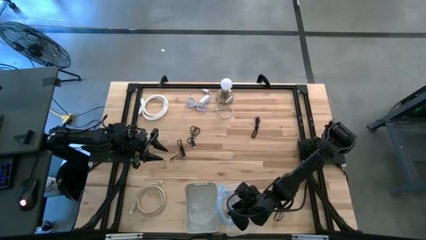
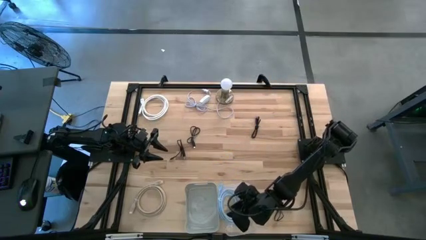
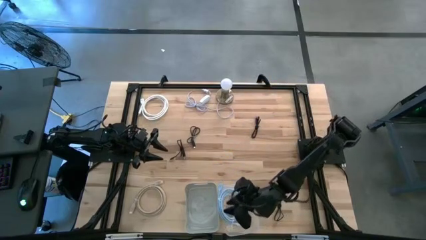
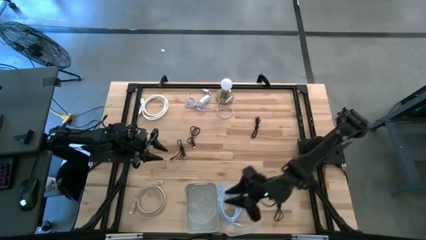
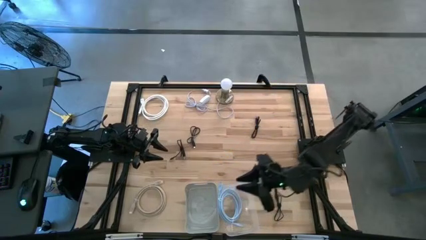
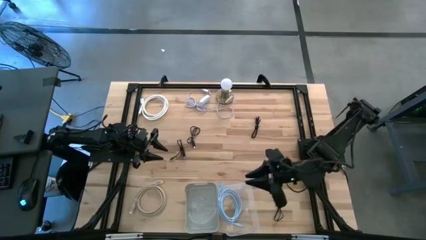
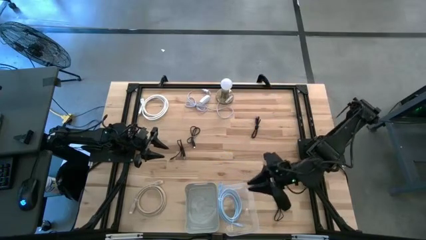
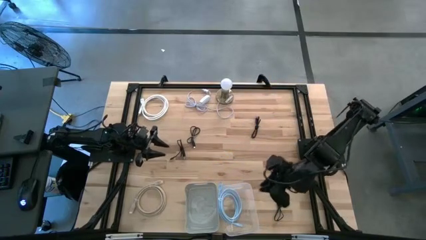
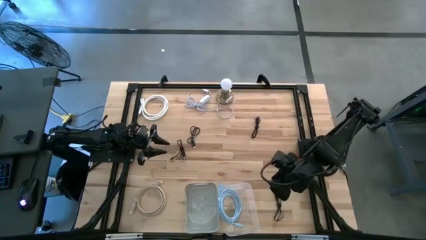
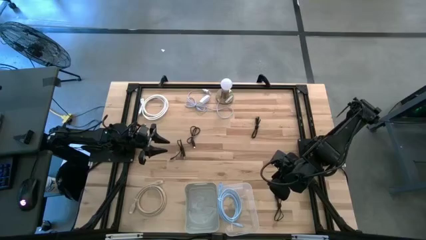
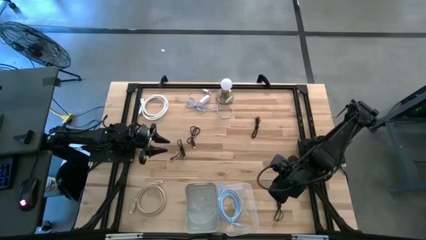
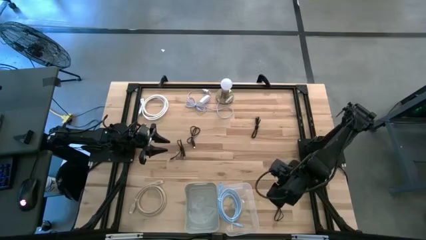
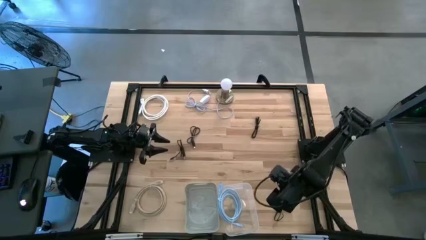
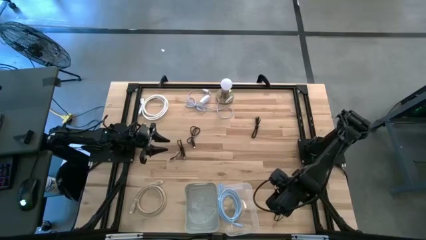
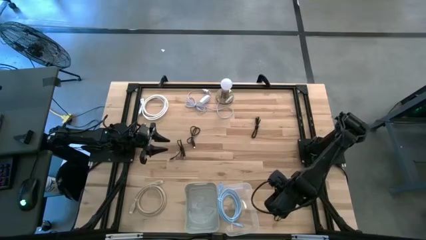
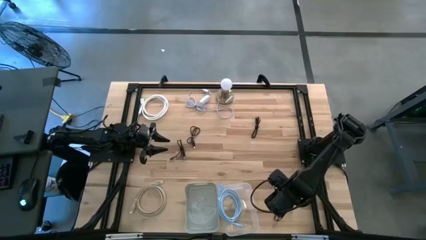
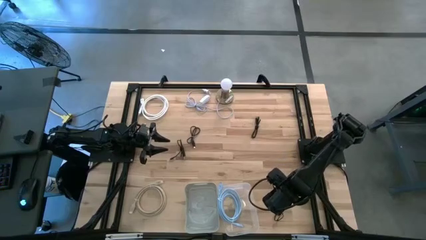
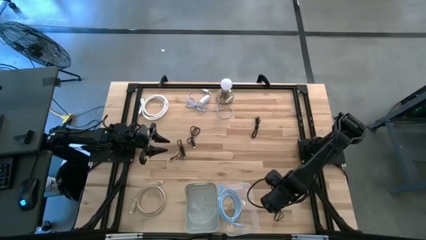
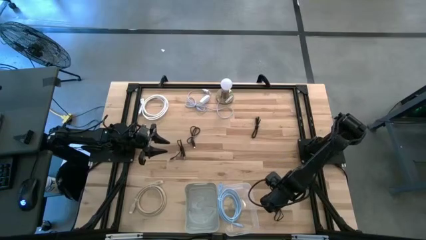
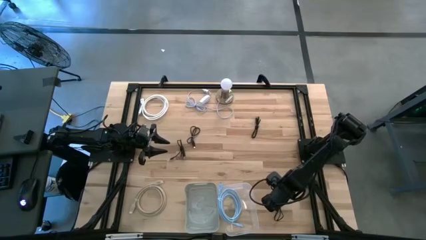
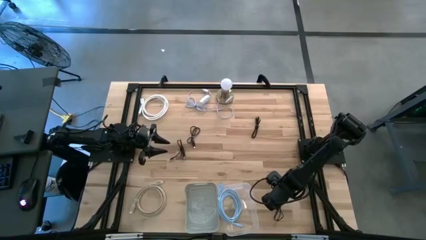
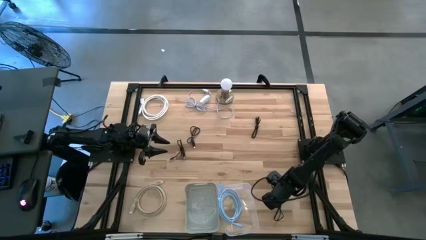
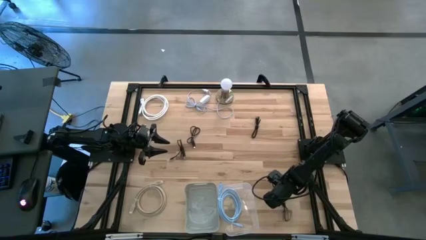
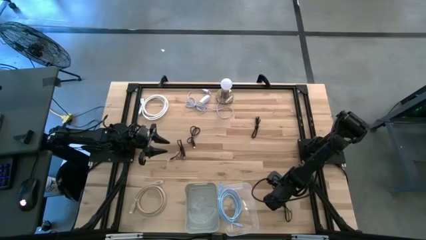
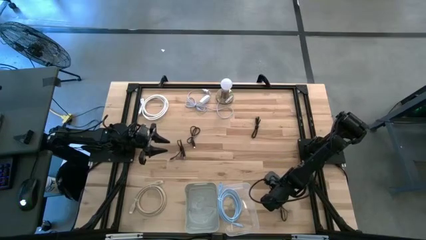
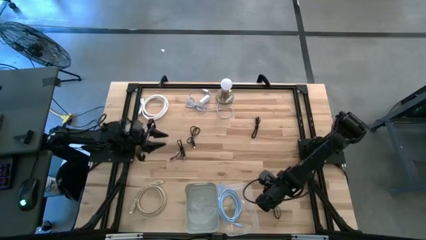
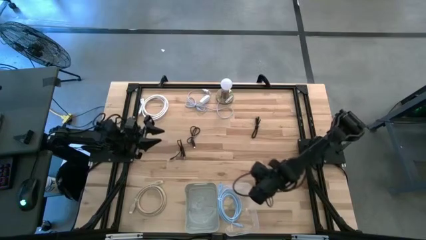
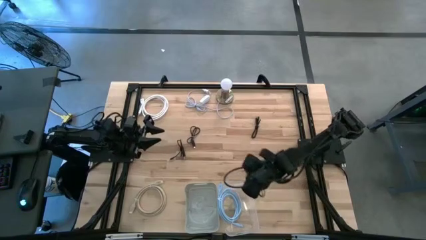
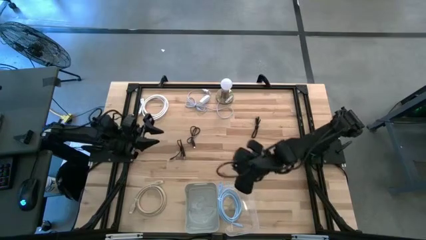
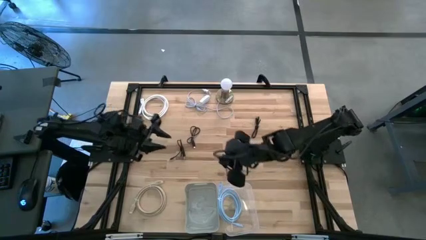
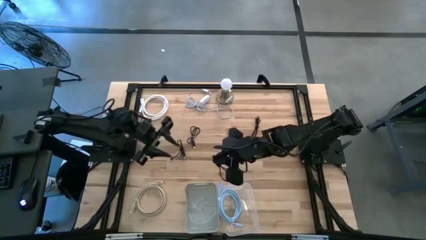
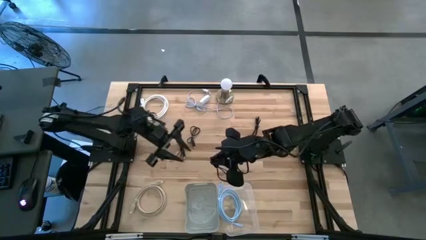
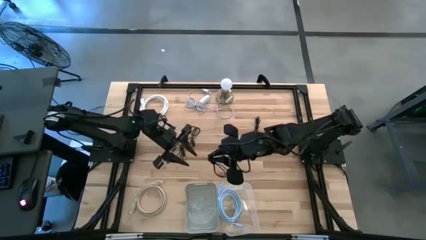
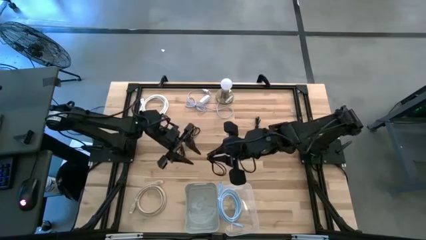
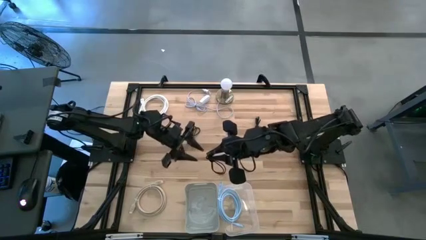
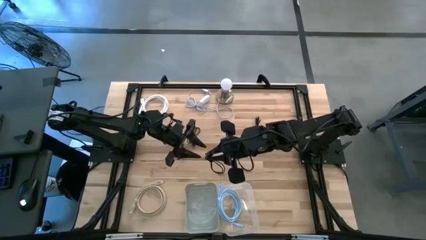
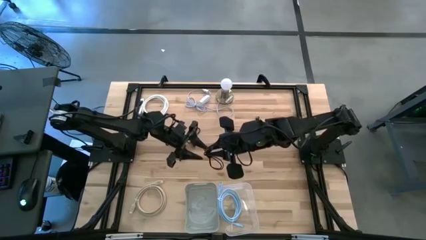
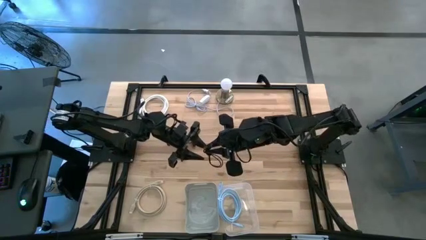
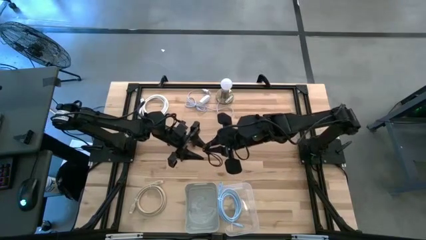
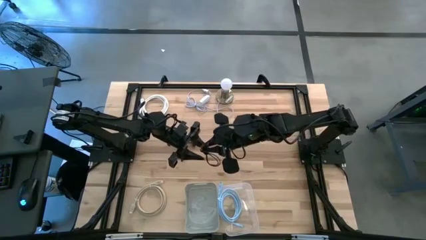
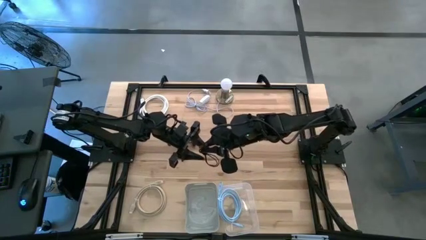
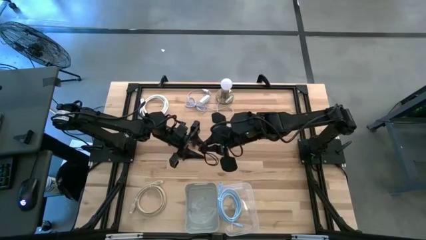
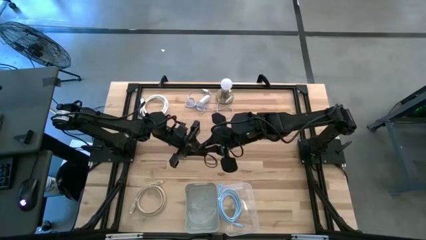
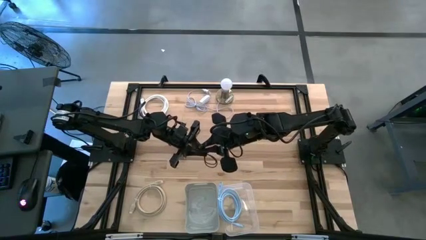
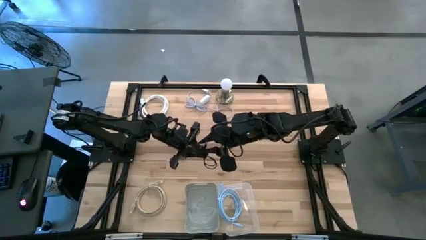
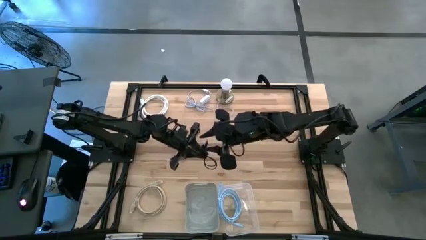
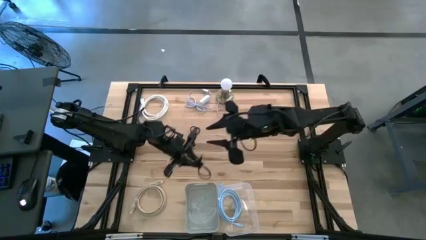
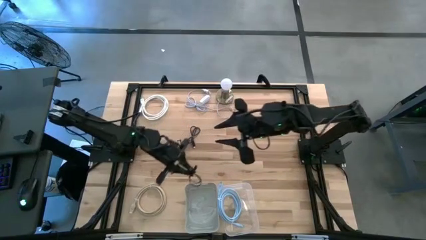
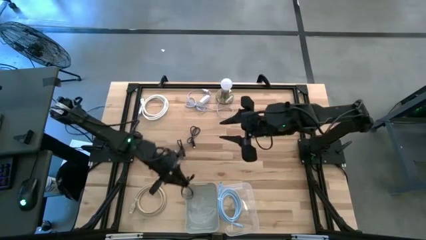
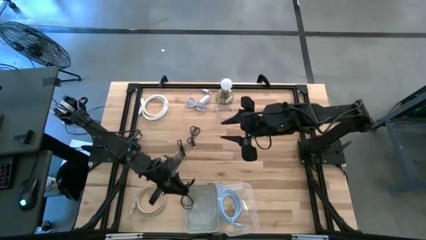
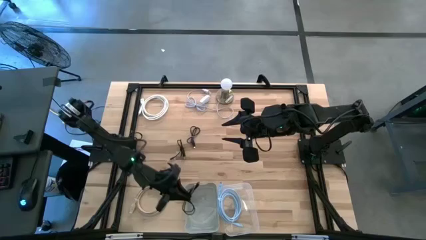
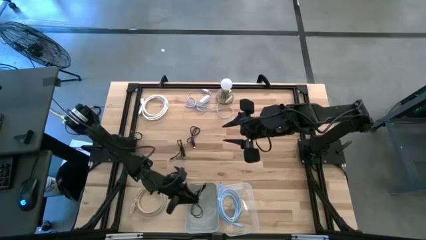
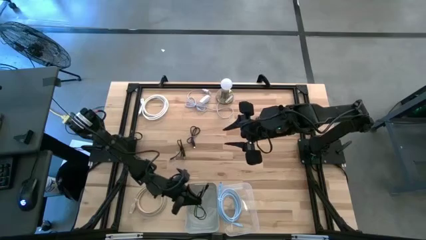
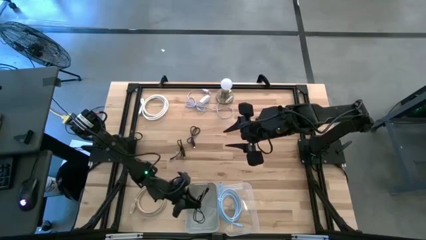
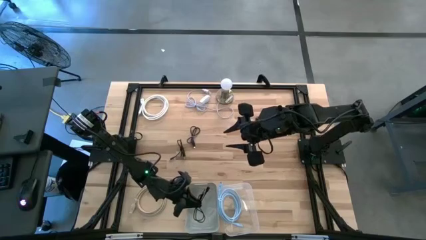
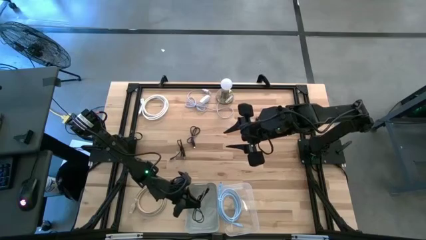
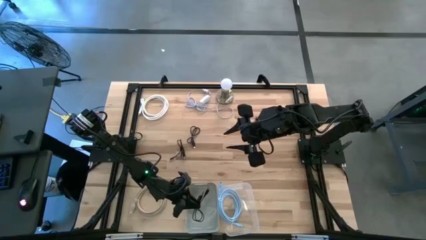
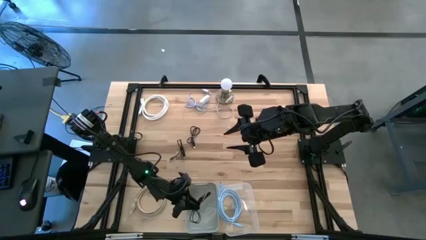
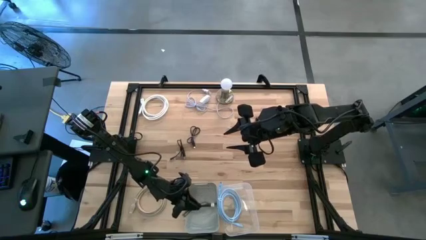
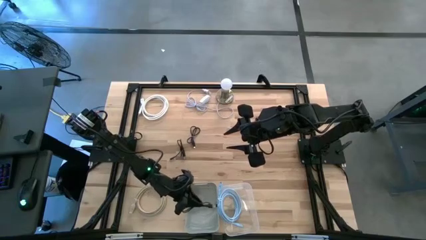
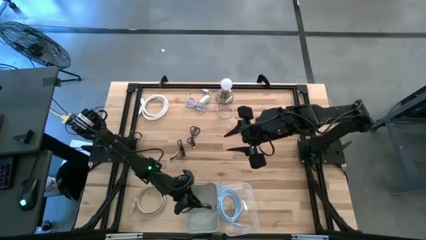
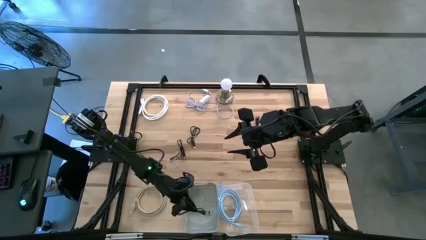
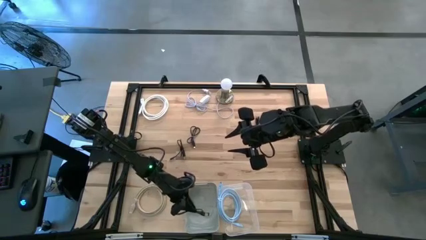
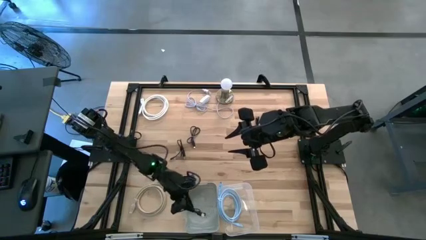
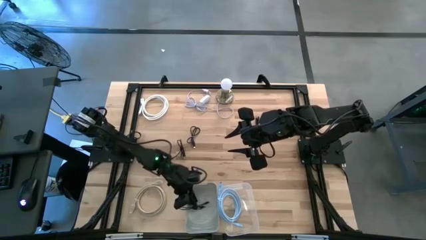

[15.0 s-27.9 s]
Task: Pick & Place USB Port
Put the black charger cable into the gray bin
